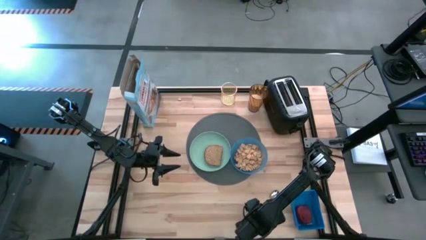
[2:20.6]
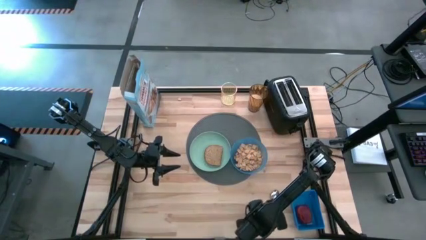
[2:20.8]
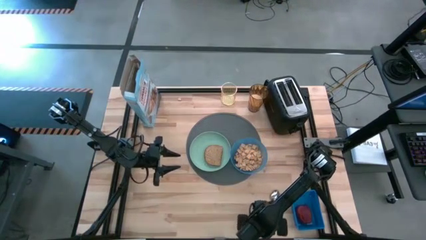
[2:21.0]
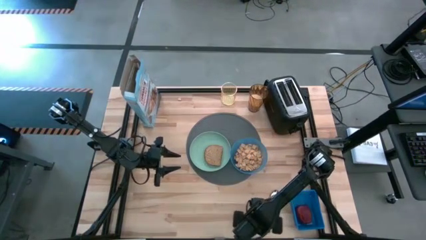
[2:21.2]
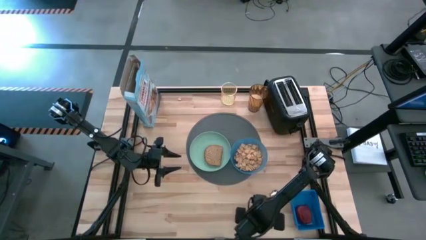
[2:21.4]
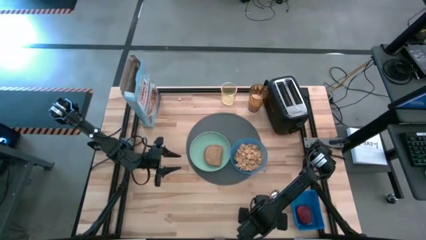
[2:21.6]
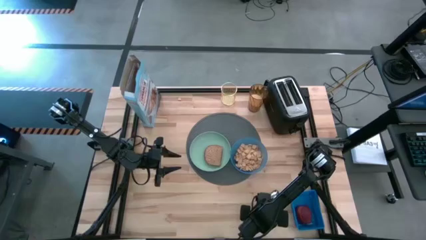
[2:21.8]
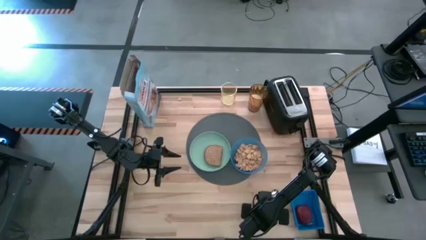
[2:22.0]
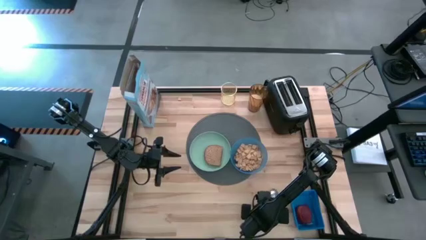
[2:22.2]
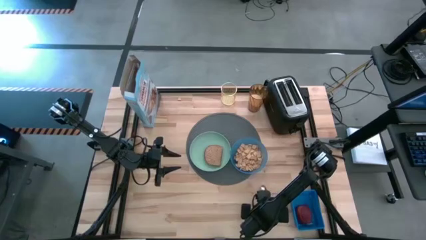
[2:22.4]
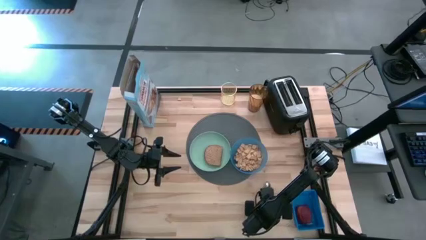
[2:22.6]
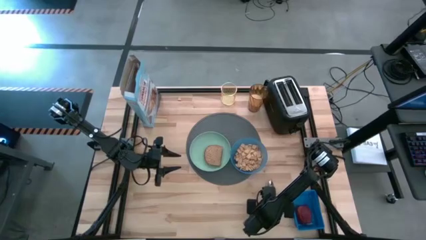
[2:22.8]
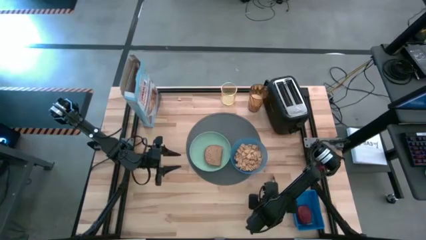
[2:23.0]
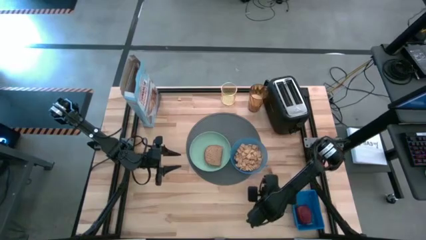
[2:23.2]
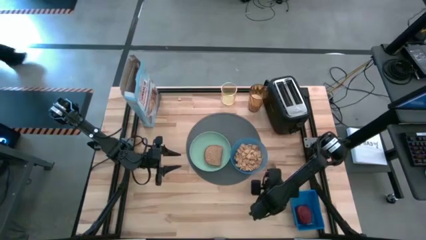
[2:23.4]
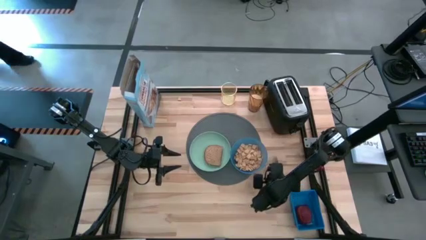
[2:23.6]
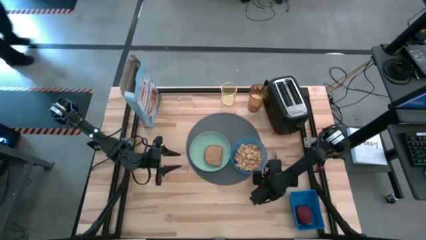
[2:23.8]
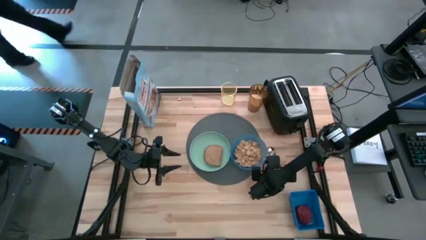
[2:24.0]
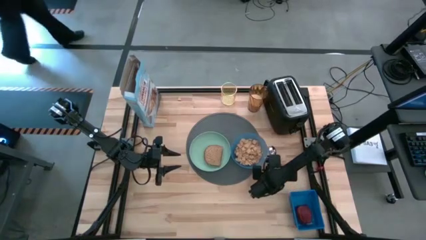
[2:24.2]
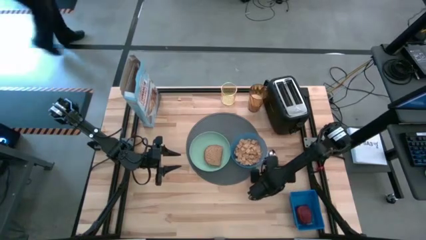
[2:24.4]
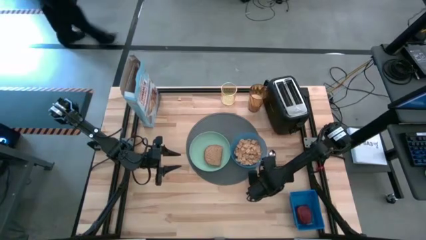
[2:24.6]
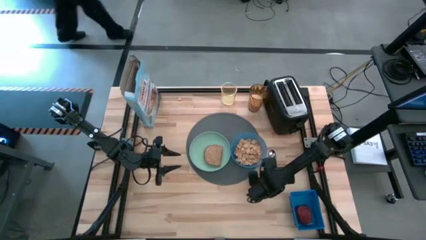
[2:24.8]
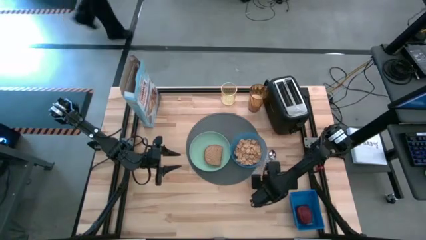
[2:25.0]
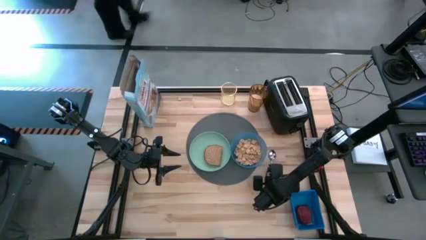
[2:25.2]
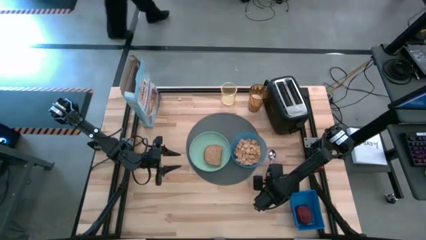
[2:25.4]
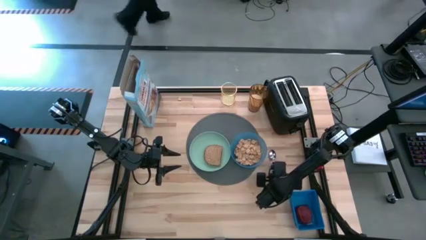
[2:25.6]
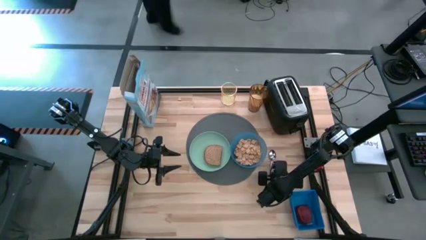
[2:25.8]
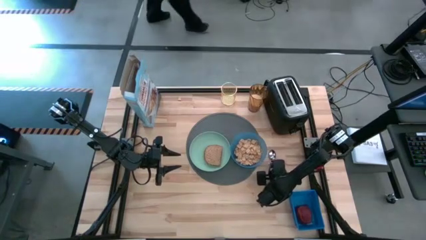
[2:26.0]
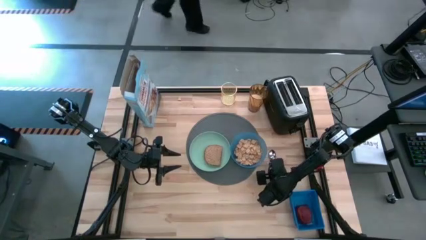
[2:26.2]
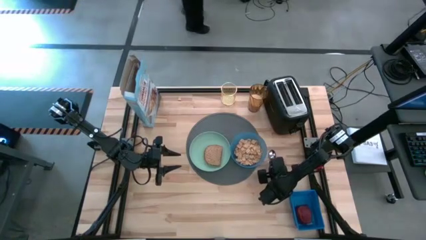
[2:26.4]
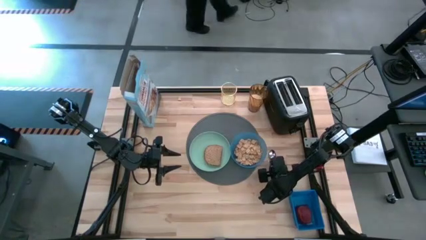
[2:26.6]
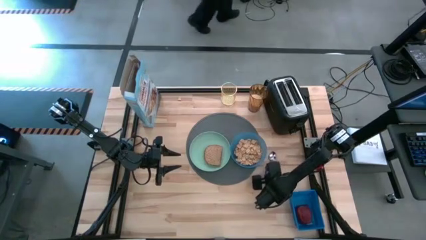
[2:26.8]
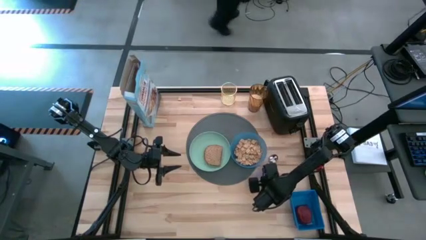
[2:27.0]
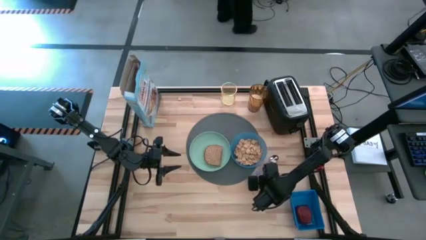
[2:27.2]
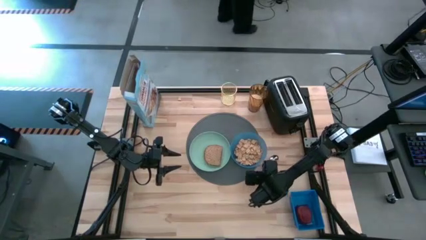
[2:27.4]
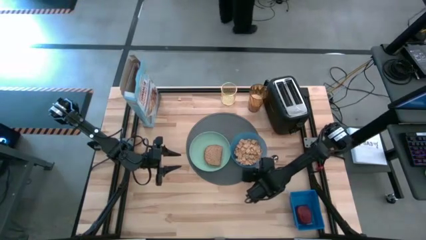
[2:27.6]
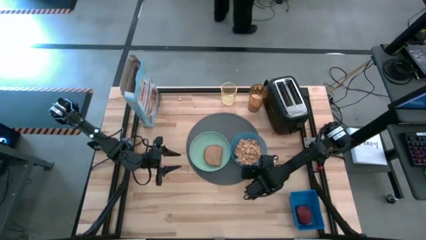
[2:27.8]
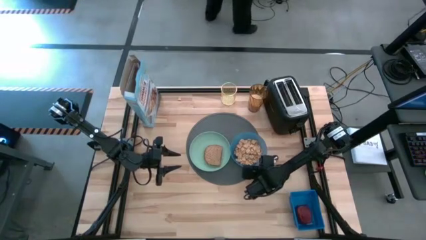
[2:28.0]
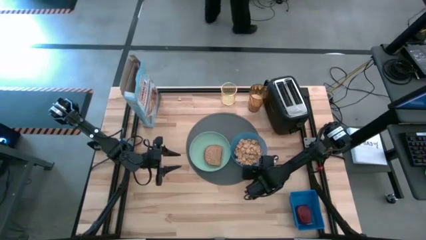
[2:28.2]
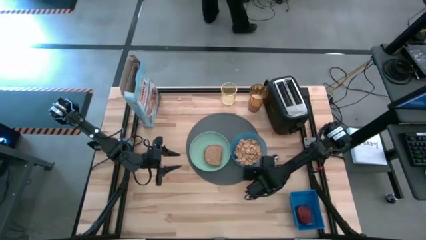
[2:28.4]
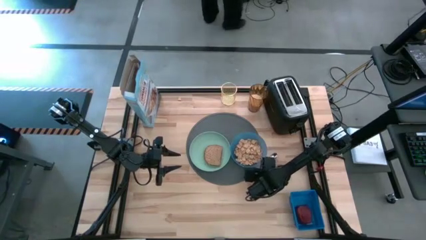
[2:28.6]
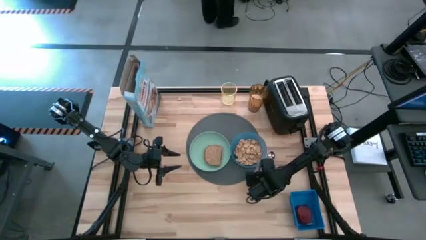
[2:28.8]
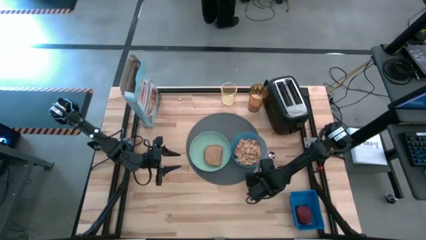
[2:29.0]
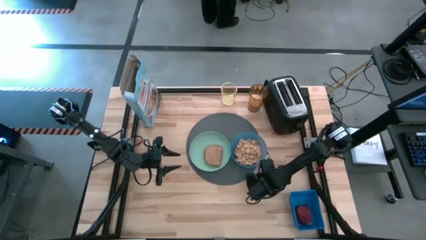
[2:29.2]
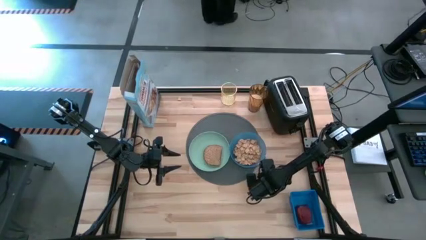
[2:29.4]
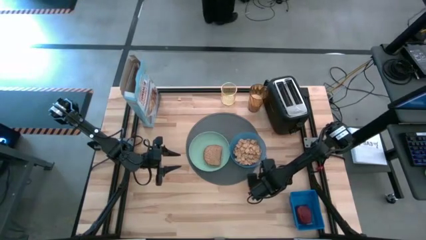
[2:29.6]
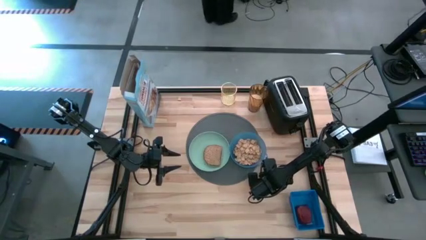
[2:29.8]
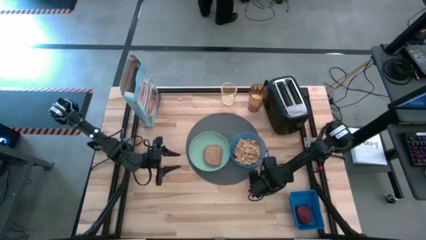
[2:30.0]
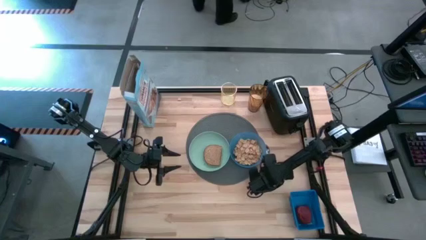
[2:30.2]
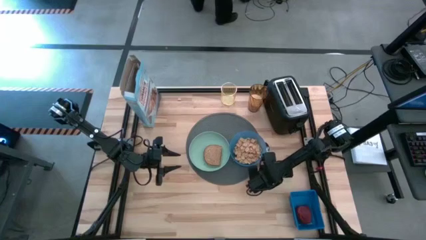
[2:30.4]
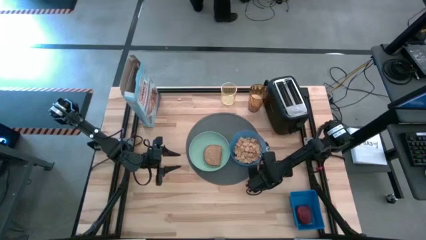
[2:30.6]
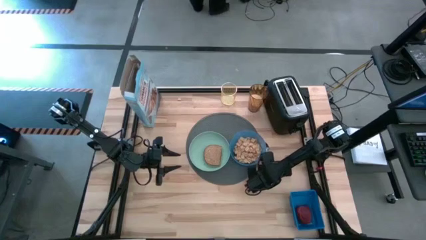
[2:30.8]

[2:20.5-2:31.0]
Task: Arrange a breakfast setting
Put the purple spoon on the table to the right of the blue bowl

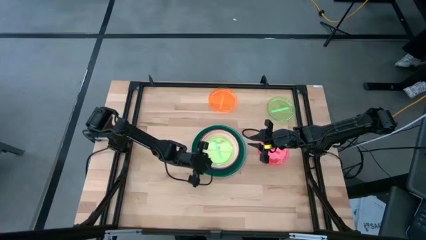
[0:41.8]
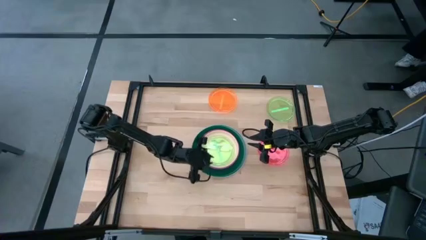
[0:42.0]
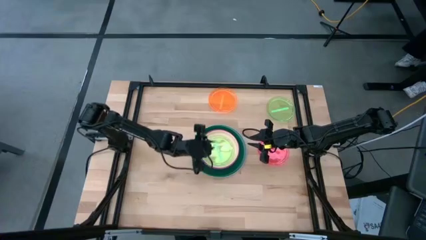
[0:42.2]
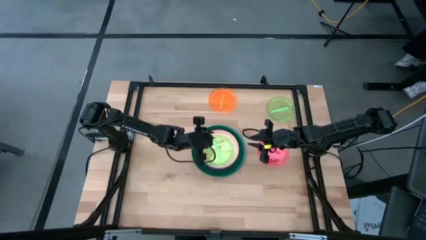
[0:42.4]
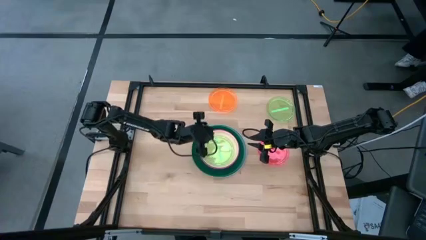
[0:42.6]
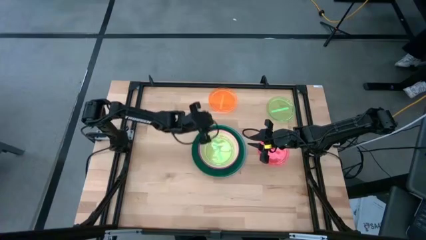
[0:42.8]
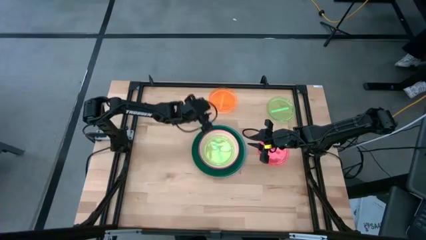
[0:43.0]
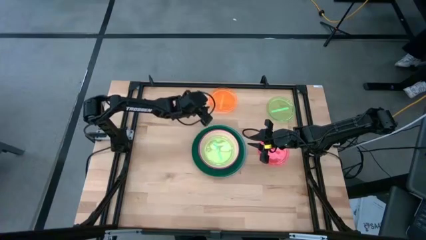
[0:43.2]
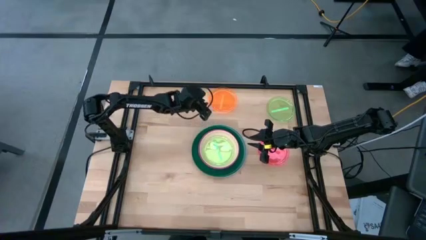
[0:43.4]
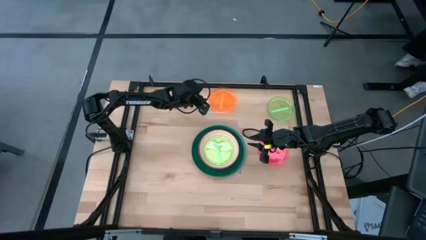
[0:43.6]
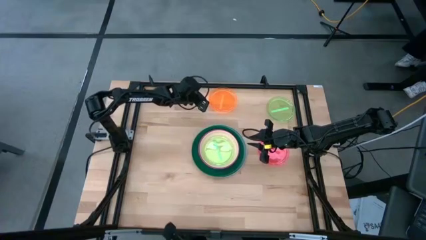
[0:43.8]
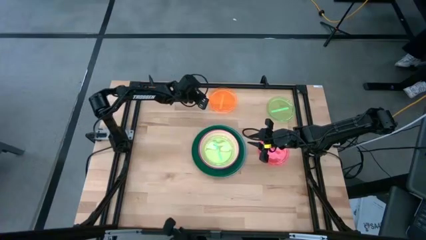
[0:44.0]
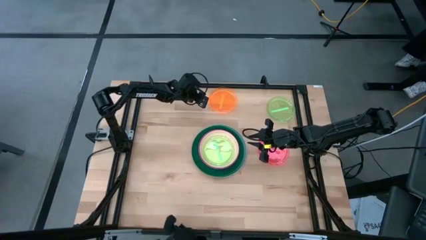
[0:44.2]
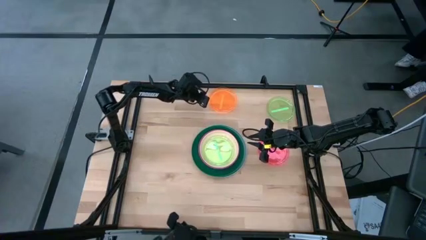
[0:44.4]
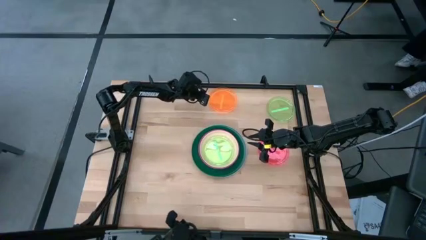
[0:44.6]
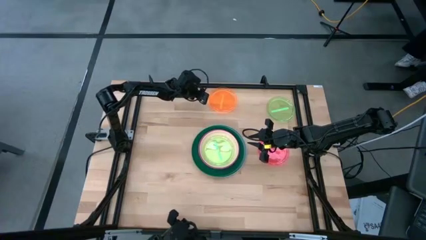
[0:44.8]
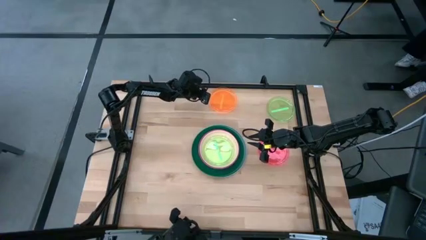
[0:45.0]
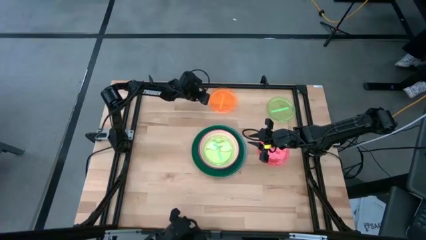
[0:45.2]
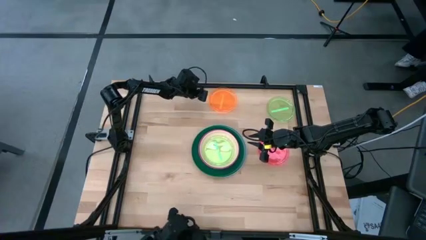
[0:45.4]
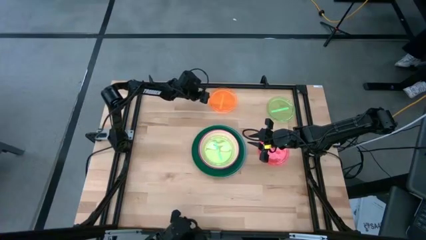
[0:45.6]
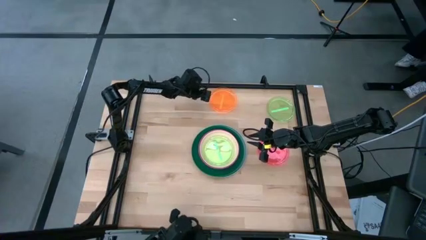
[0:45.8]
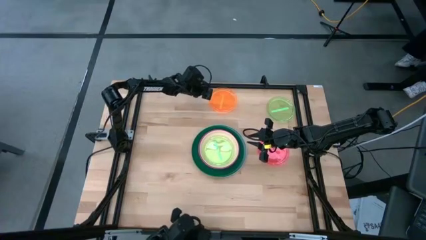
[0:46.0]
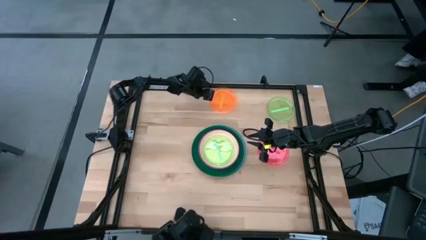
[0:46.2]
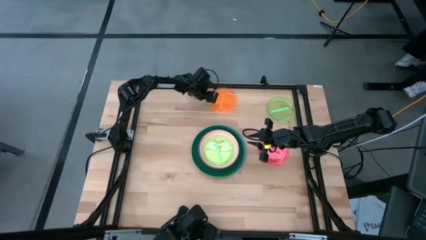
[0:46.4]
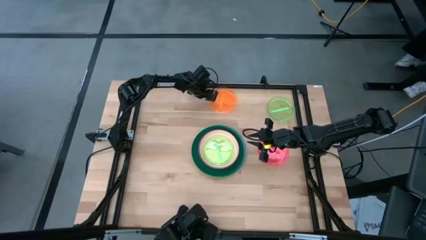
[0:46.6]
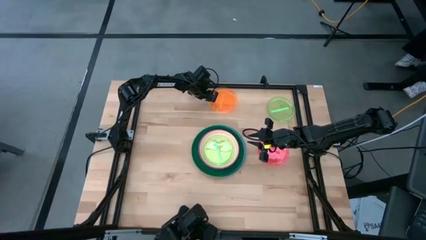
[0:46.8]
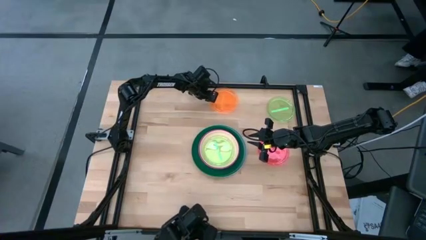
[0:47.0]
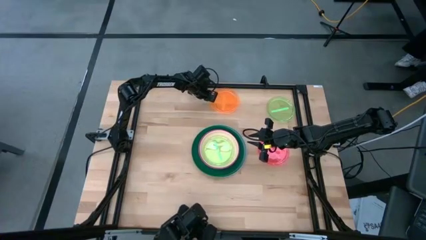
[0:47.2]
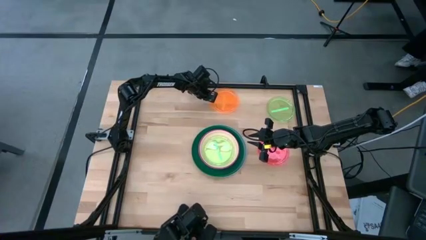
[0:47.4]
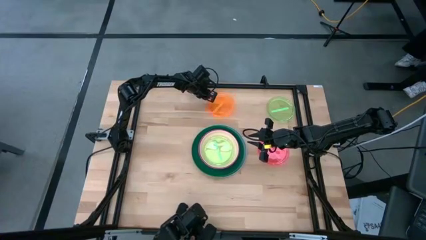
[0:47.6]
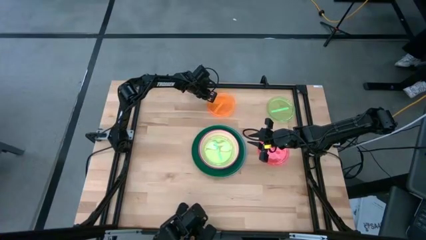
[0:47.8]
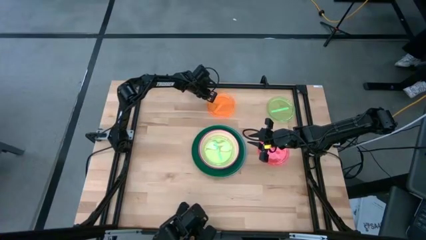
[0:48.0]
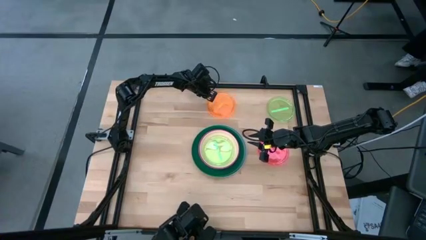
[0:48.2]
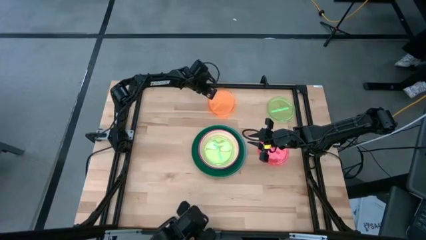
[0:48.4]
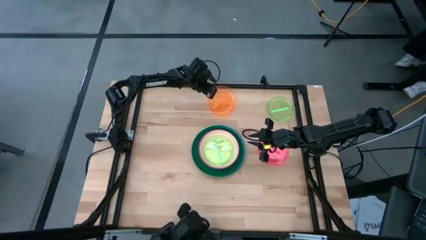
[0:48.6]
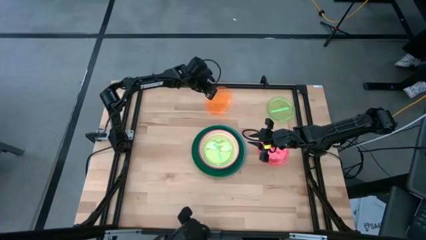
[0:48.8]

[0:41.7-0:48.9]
Task: Stack plastic plates
Stack the orange plate on top of the bottom light green plate
